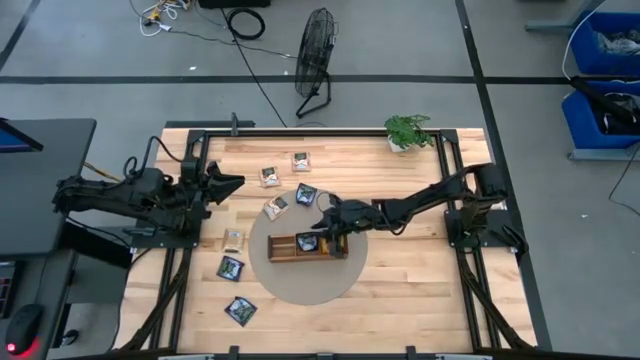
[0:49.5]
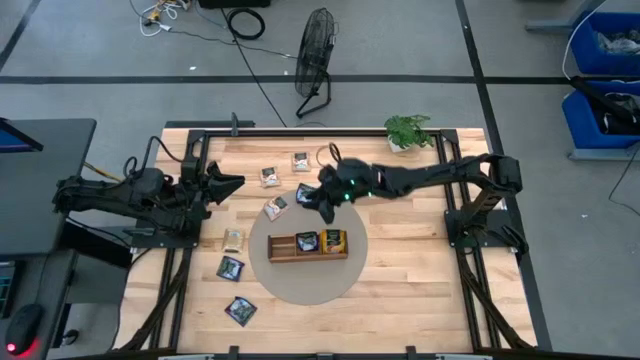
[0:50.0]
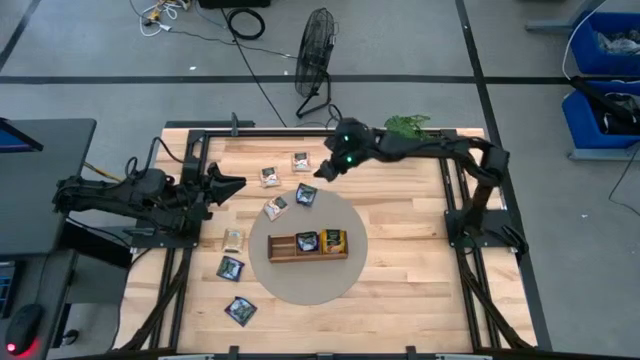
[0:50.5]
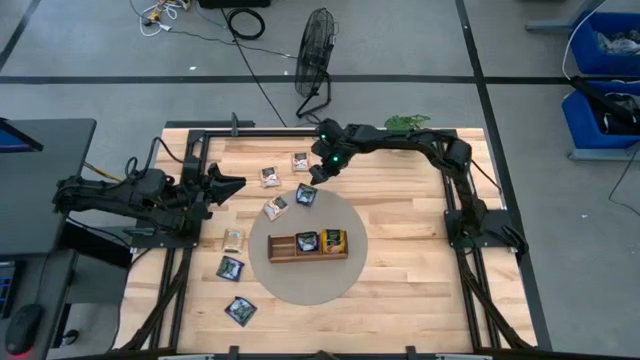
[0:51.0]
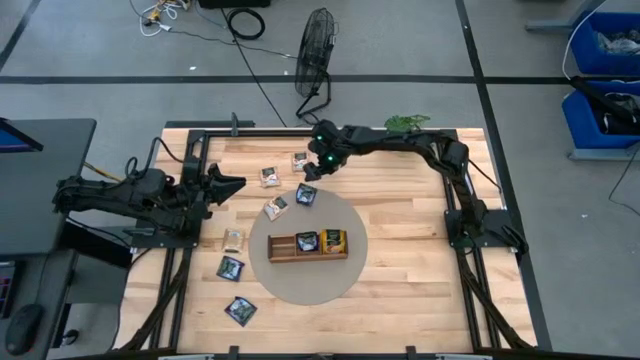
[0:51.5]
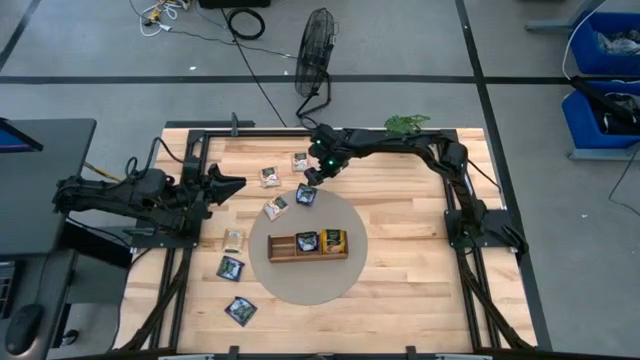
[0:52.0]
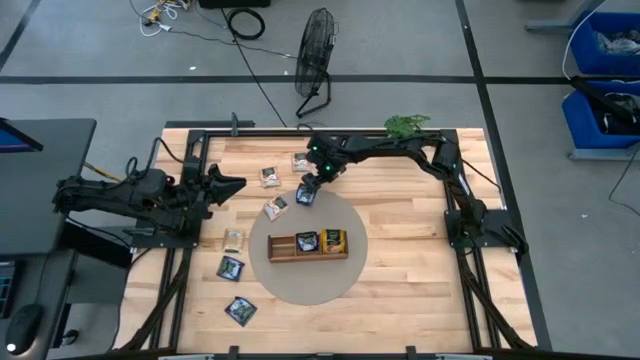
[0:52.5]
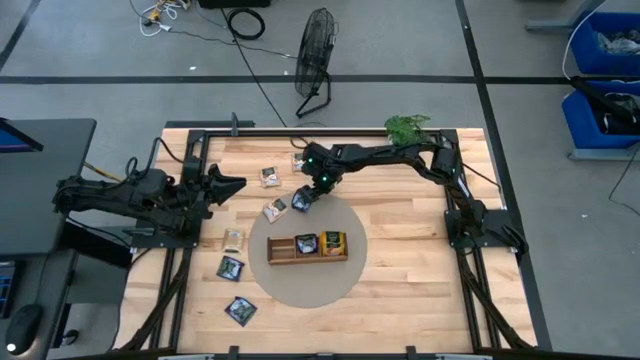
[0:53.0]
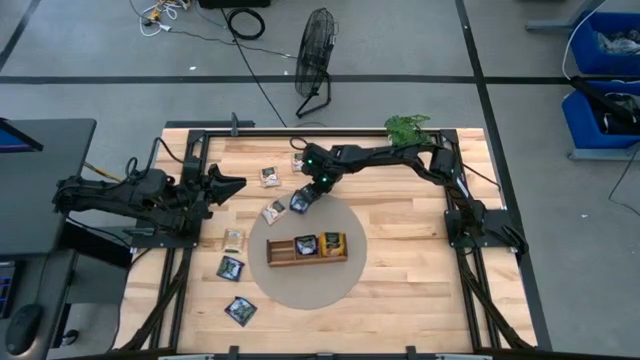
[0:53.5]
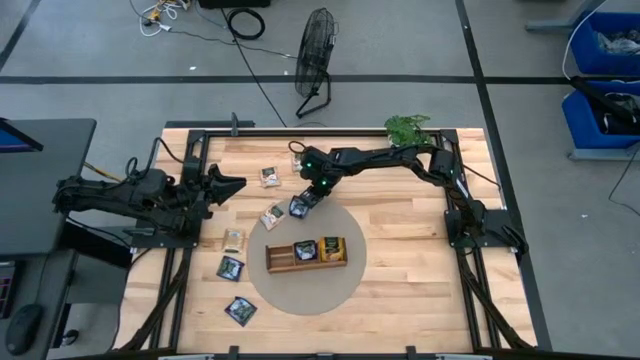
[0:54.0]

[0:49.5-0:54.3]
Task: Pick & Place Tea
Put the violet tea bag into the middle section of the wooden organizer

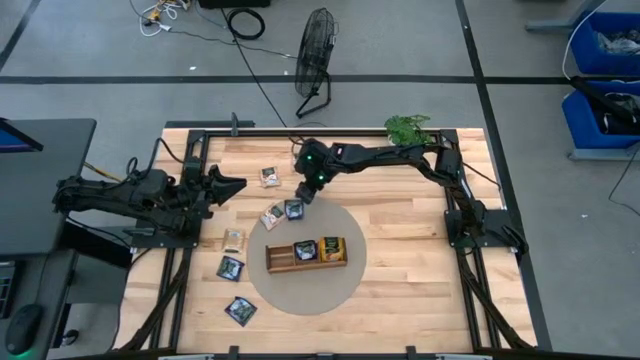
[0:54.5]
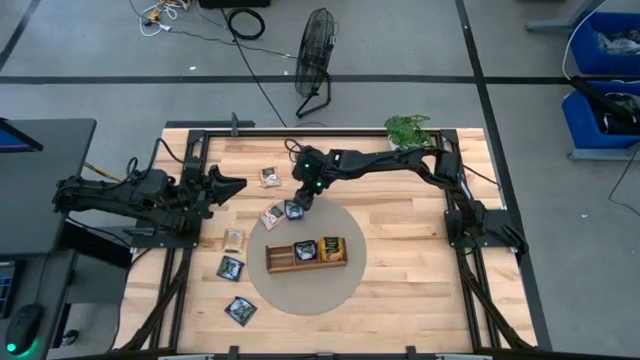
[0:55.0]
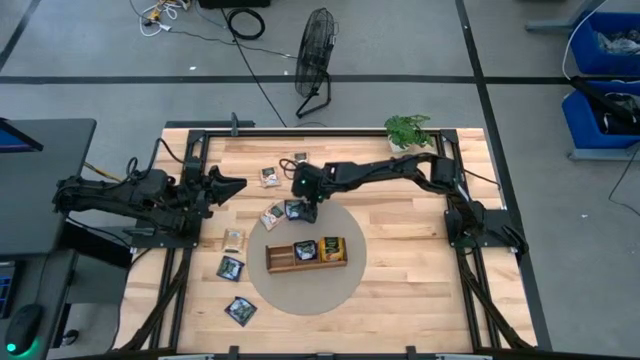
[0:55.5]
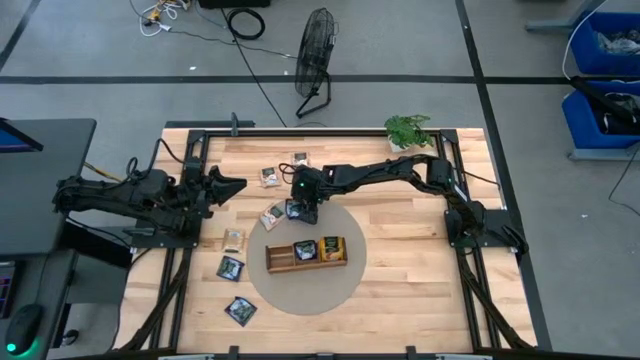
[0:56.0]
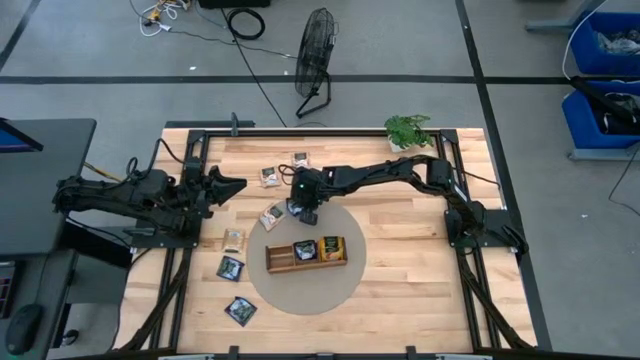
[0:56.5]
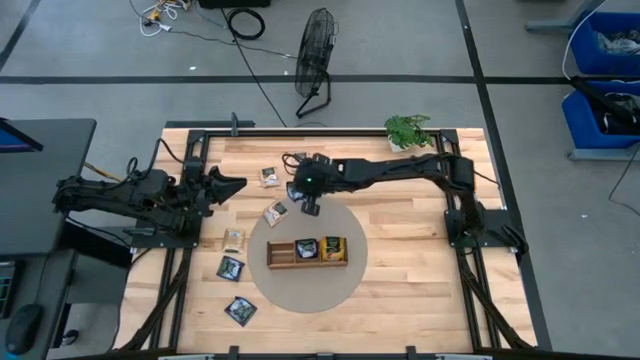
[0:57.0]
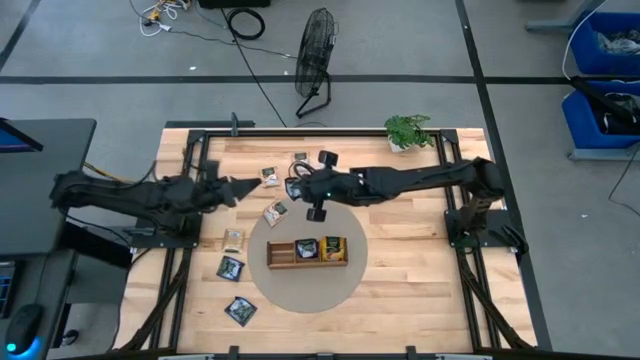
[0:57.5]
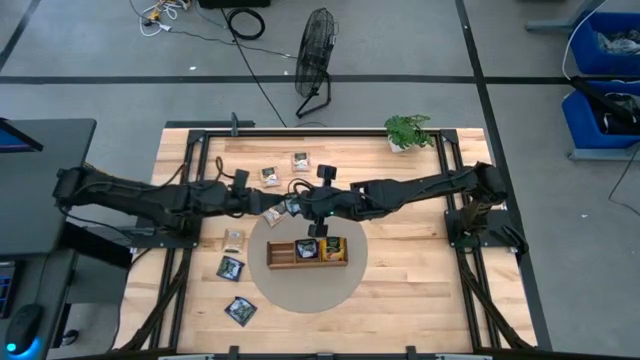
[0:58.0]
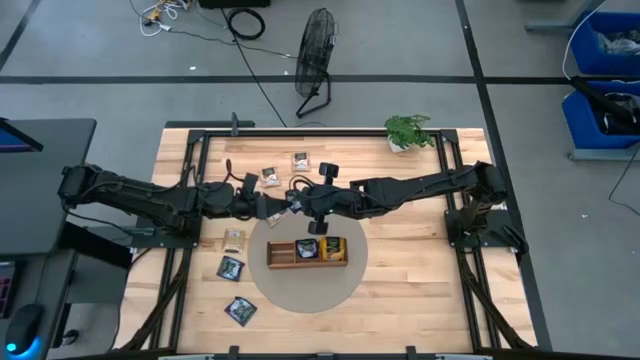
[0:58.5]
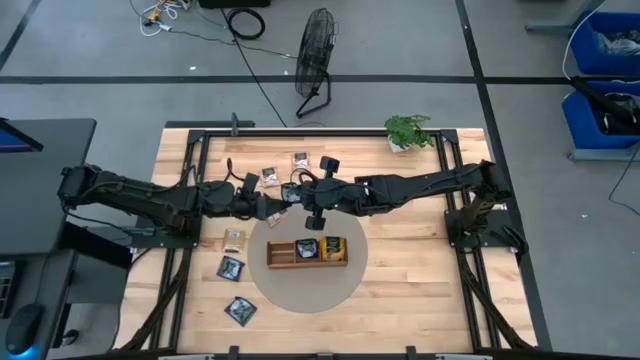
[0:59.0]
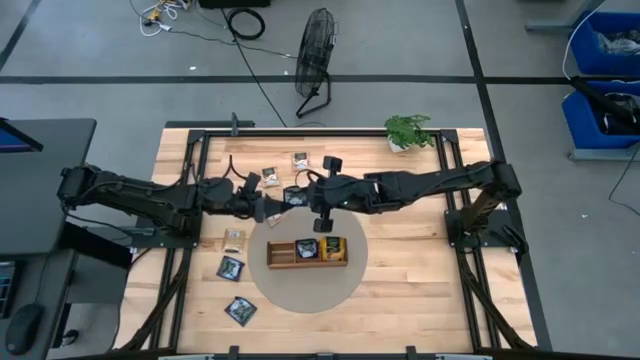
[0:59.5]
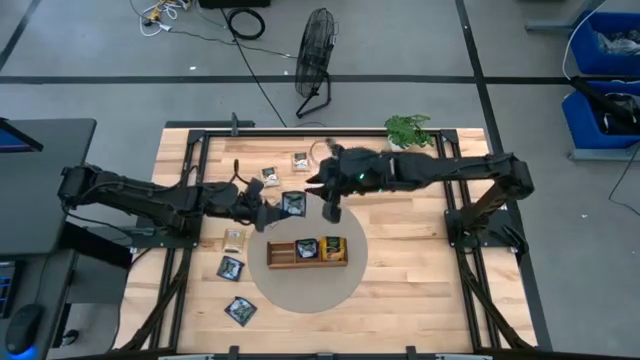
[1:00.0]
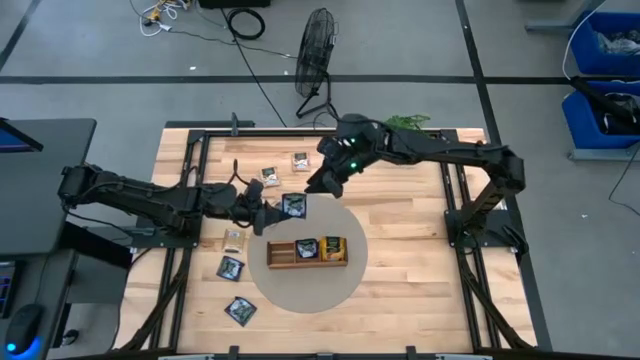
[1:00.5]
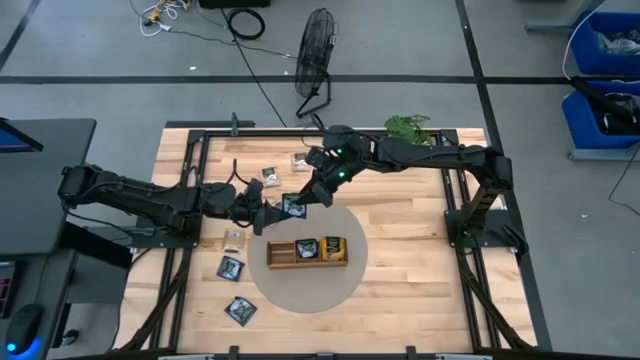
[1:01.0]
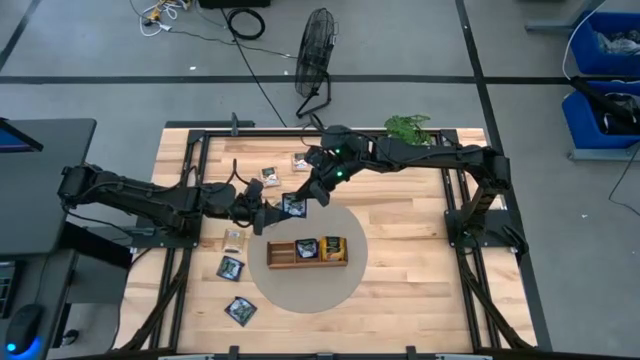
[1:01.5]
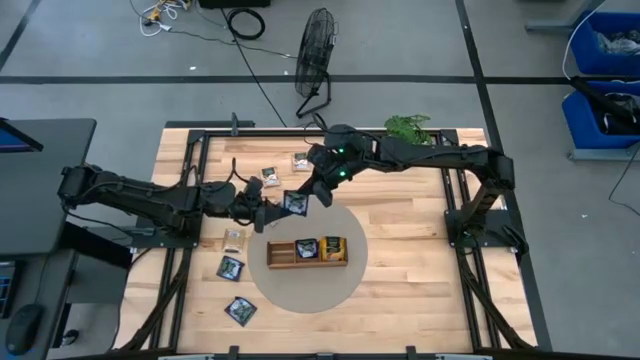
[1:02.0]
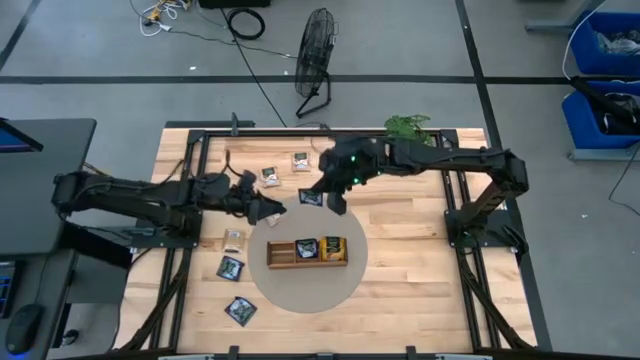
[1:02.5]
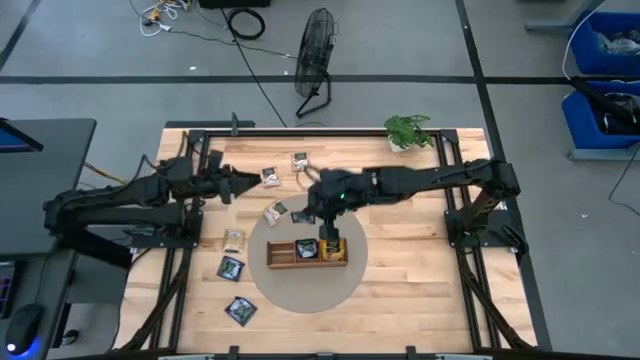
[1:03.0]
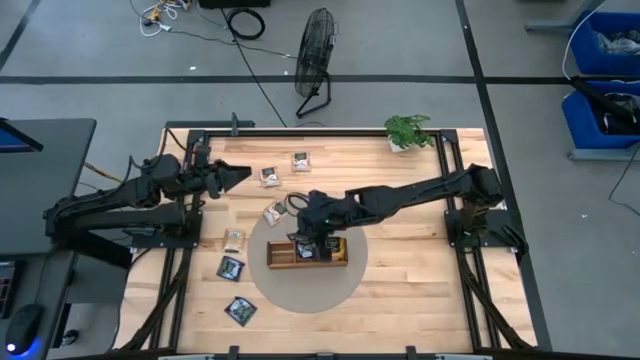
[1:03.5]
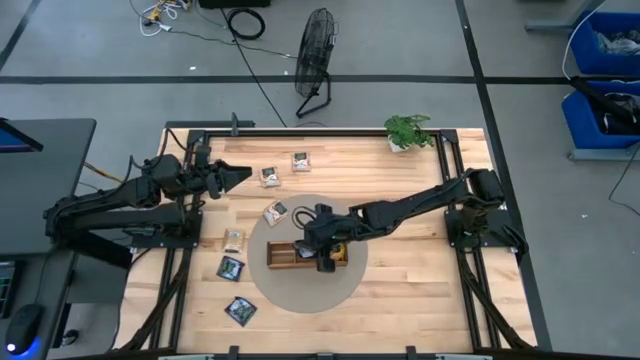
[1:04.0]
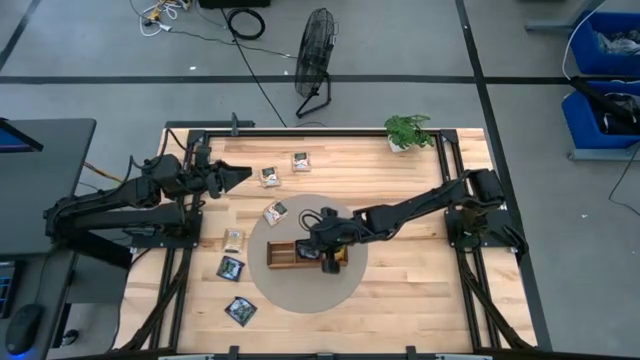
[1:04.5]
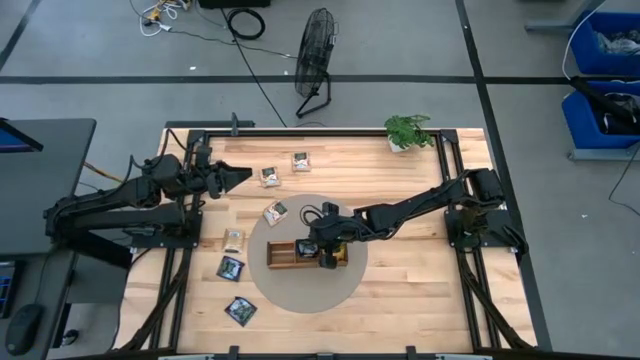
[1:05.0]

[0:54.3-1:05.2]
Put the violet tea bag into the middle section of the wooden organizer

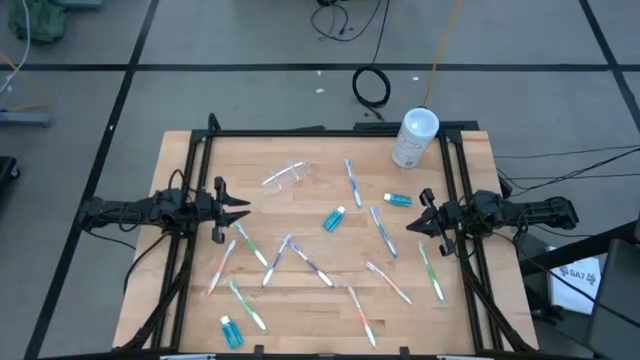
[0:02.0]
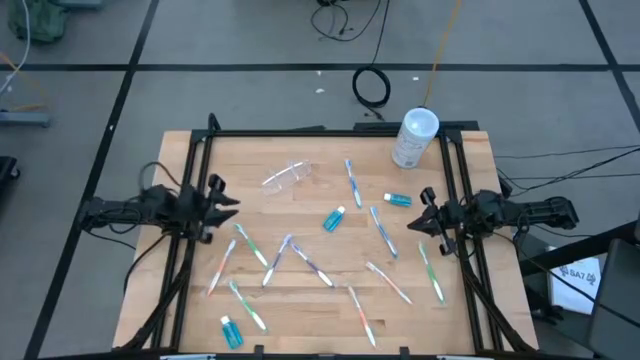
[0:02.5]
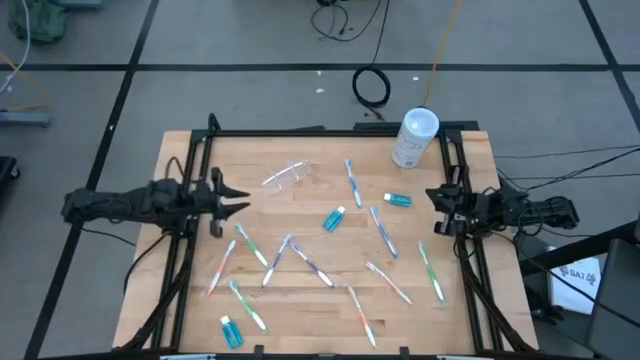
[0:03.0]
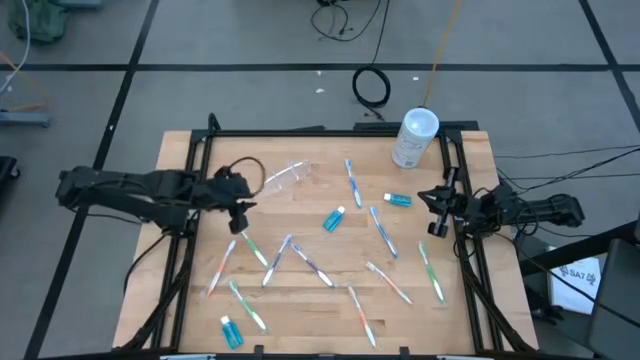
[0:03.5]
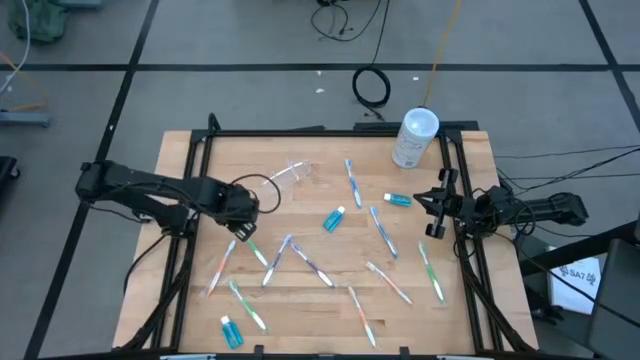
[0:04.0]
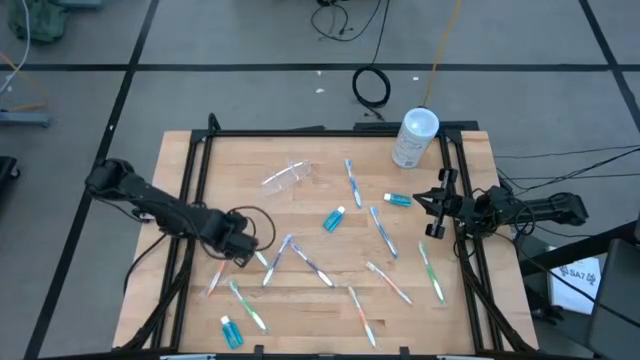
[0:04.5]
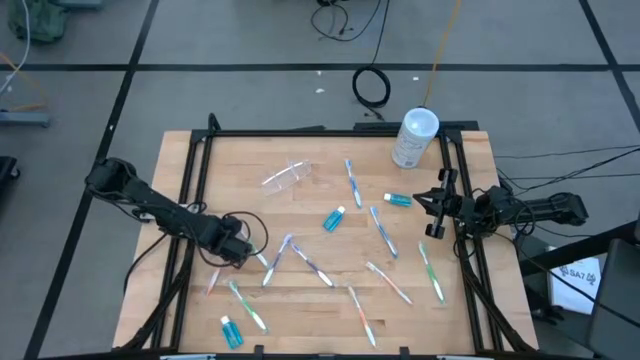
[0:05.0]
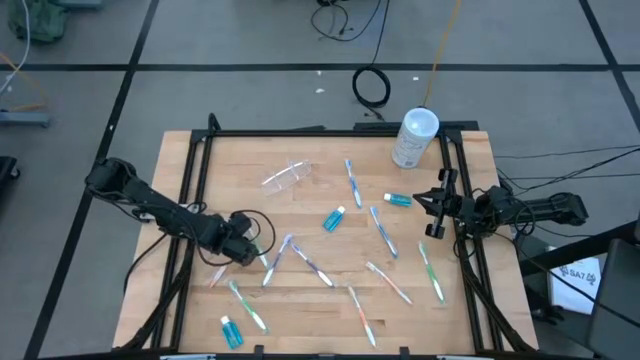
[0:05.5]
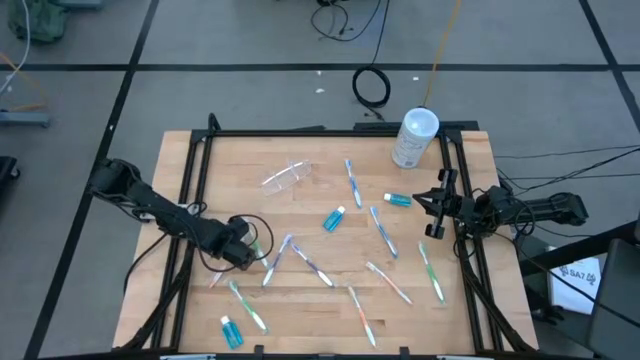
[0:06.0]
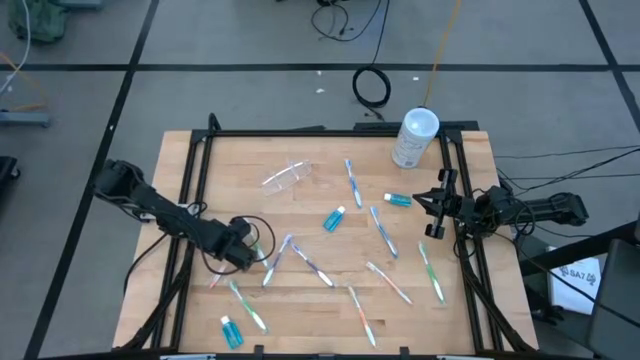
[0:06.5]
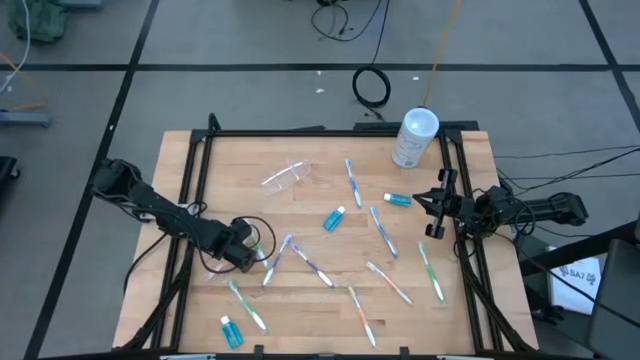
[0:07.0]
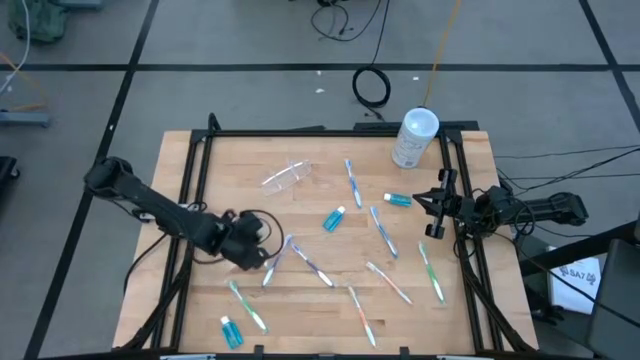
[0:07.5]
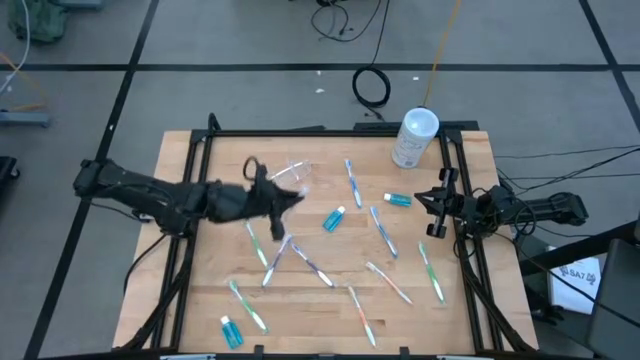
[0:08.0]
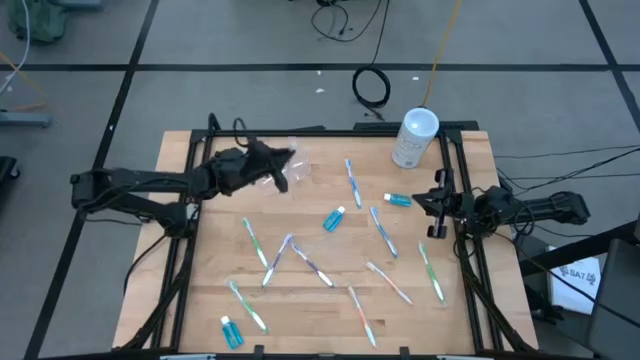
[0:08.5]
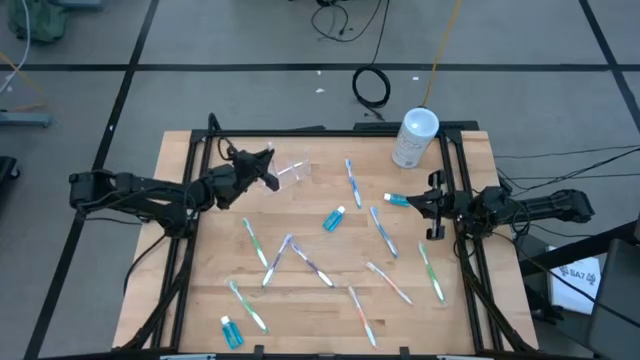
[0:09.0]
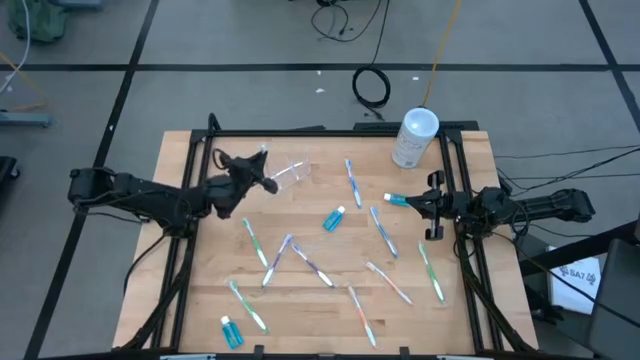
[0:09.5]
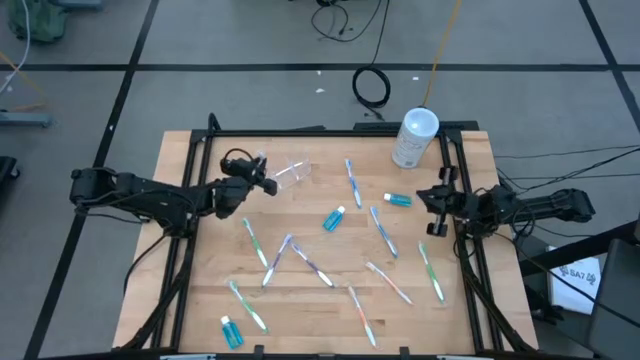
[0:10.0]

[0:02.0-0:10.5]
Task: Pick & Place toothbrushing station
Put the orange toothbrush into the transparent organizer
